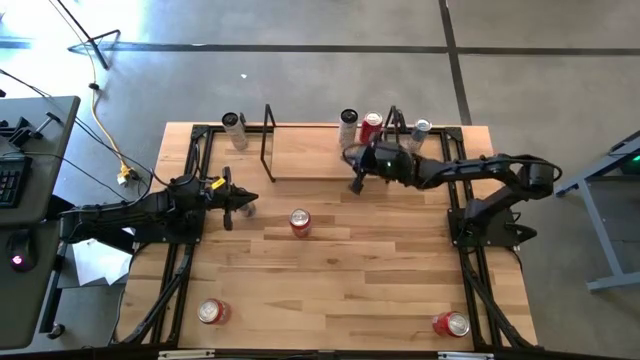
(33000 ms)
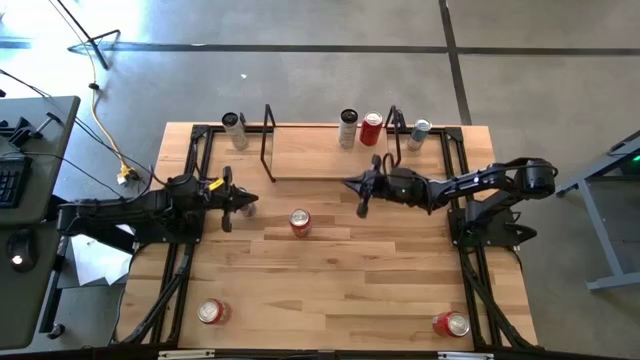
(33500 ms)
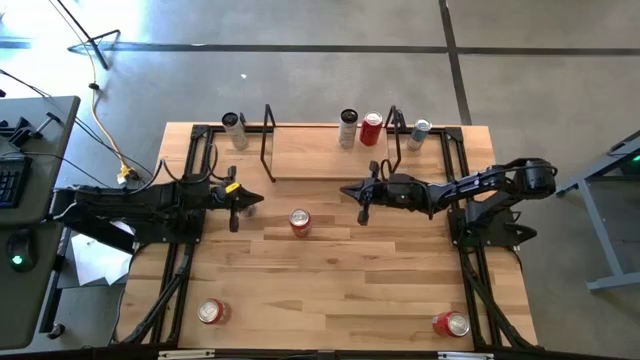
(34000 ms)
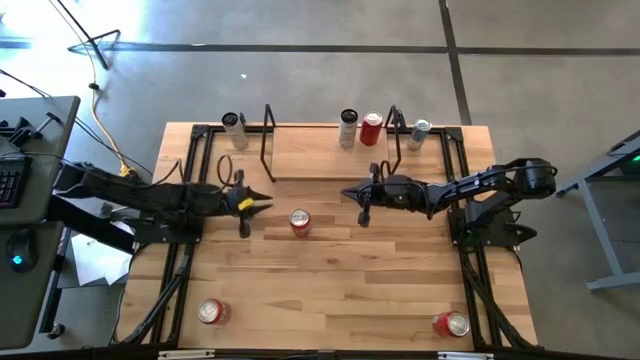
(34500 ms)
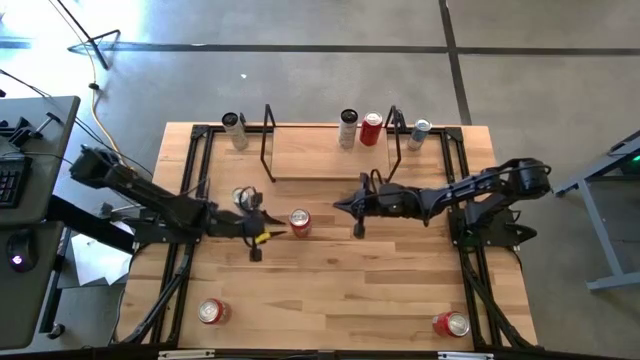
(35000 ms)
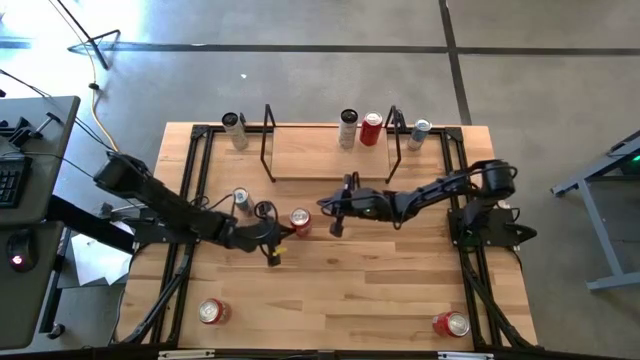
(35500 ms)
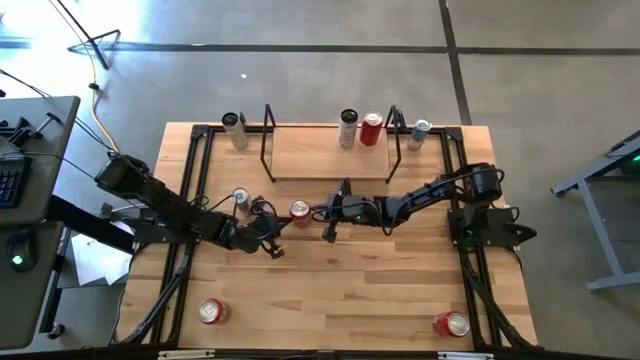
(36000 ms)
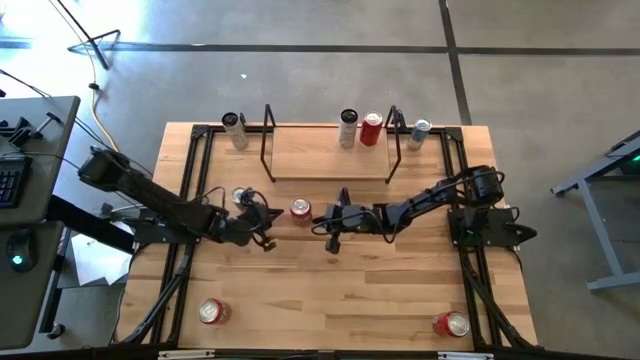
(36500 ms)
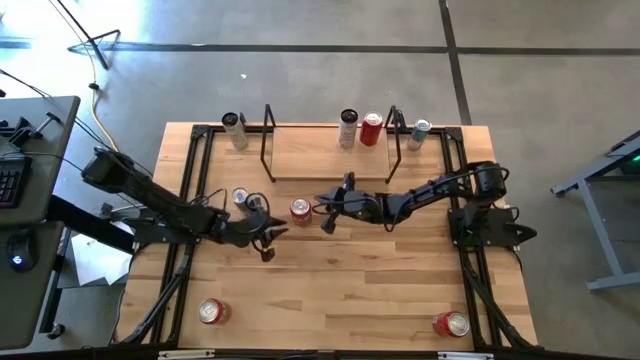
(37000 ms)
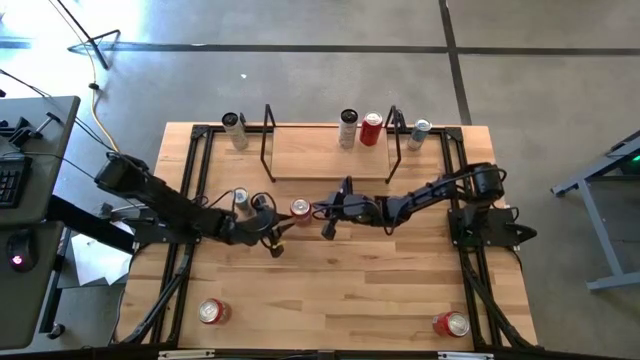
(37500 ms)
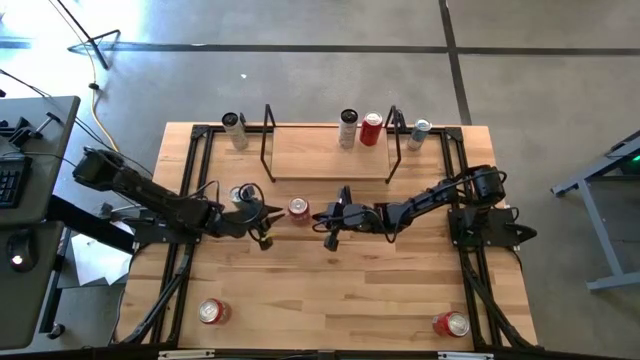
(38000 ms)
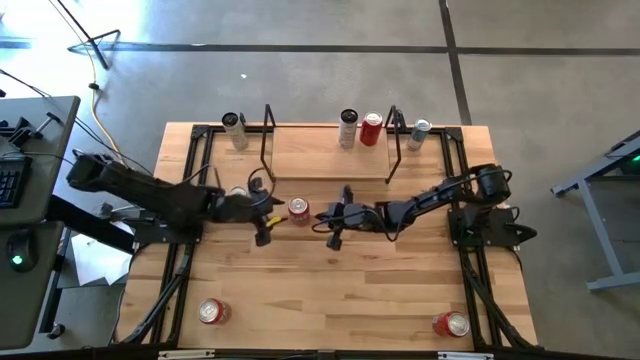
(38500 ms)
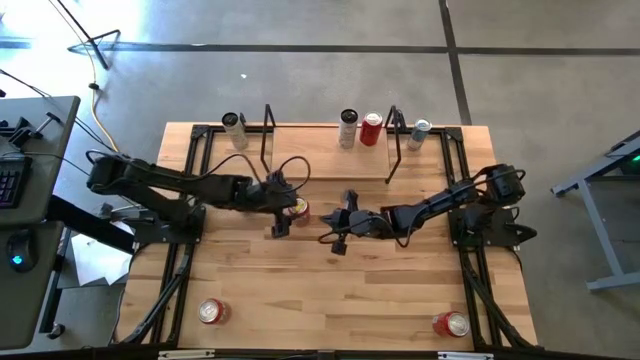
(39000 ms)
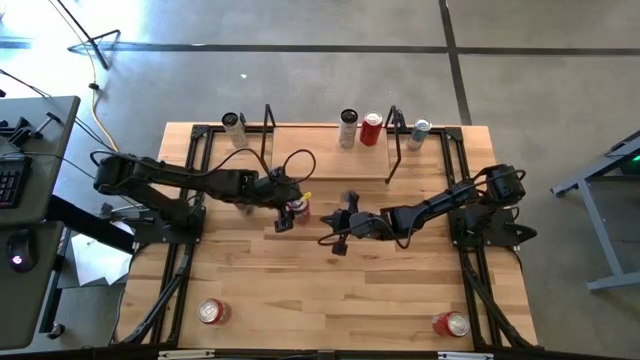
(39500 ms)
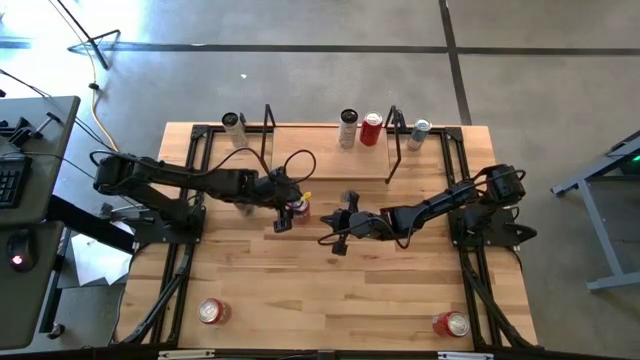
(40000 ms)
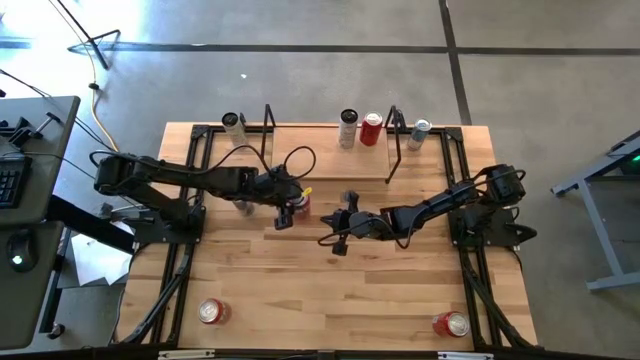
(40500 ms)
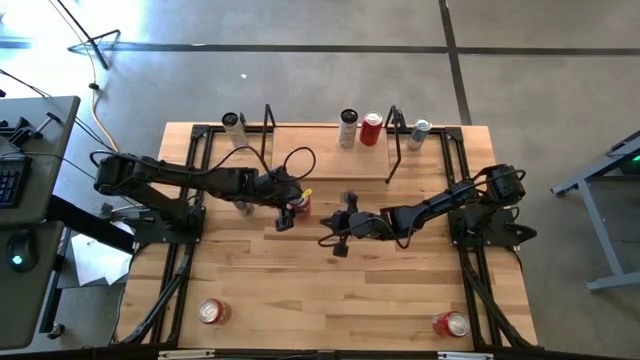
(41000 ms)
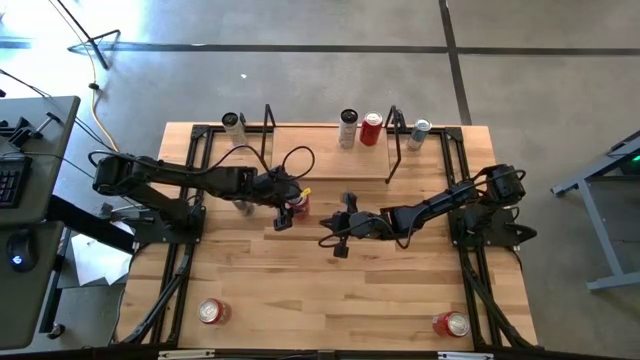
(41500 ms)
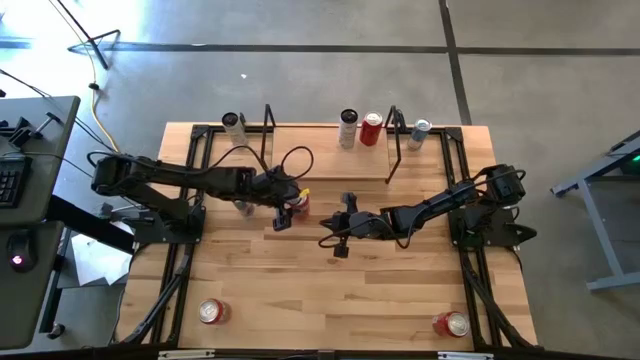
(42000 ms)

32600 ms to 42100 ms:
Task: Place canned beverage on shelf
Put the top red soda can on the shelf

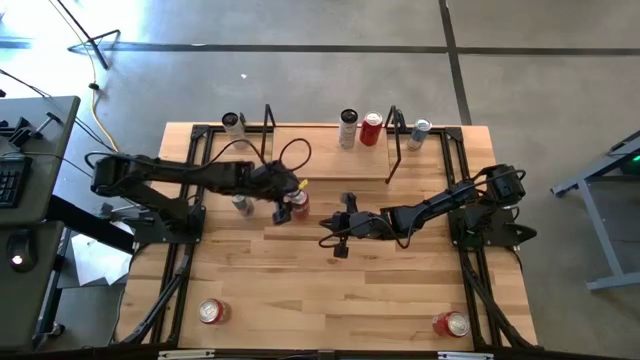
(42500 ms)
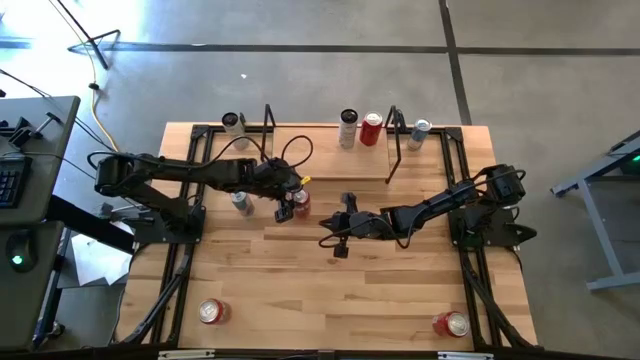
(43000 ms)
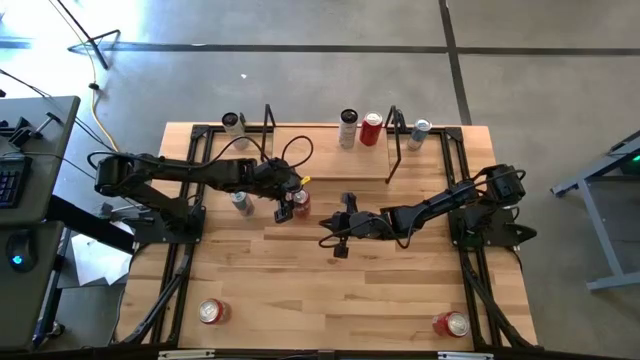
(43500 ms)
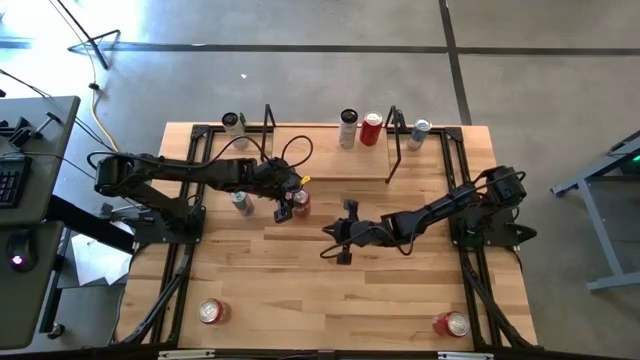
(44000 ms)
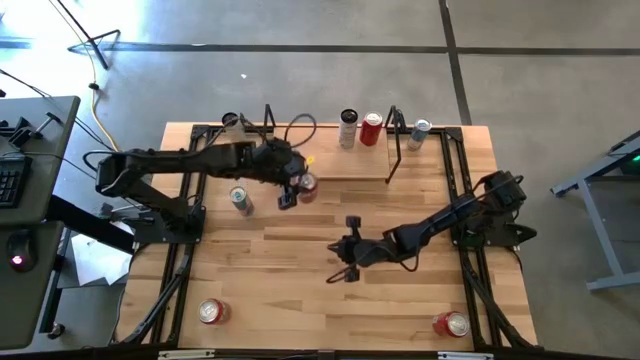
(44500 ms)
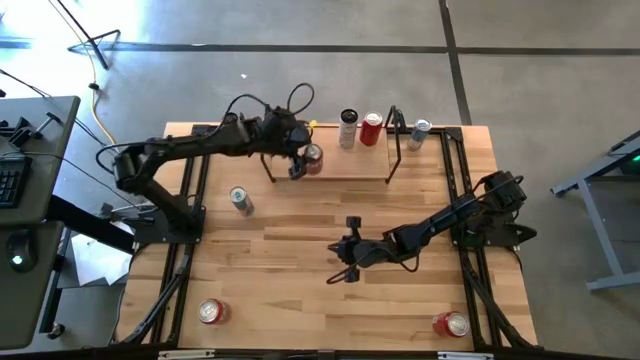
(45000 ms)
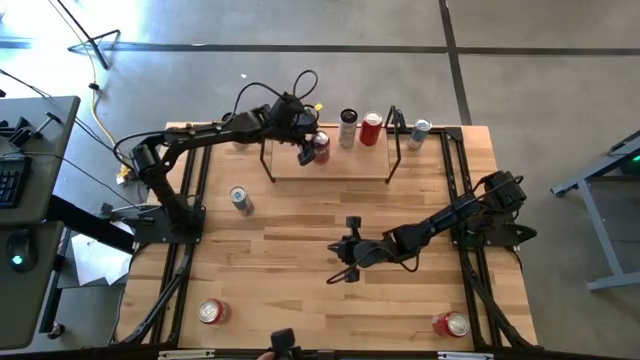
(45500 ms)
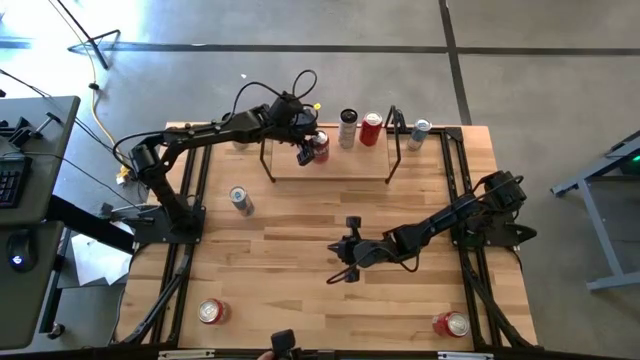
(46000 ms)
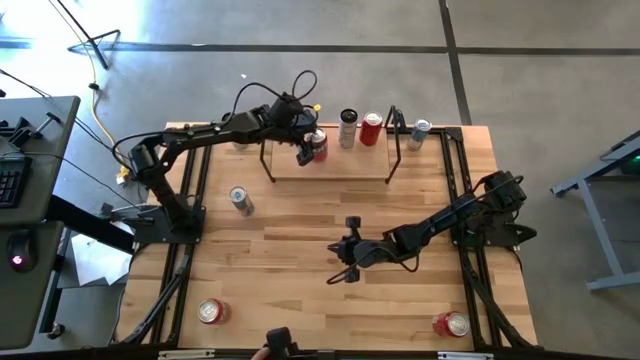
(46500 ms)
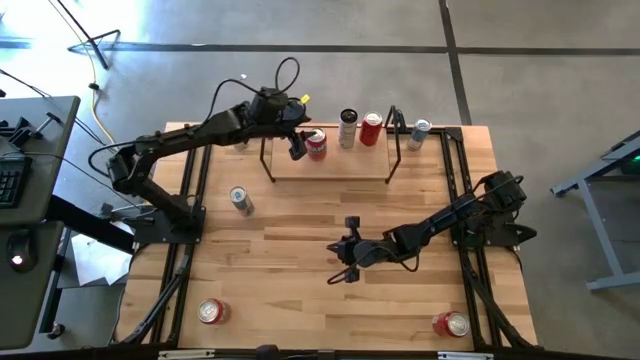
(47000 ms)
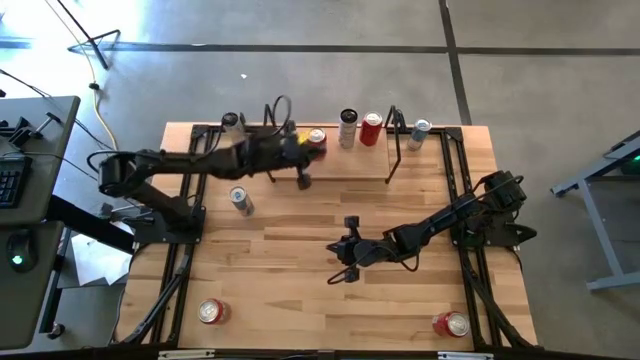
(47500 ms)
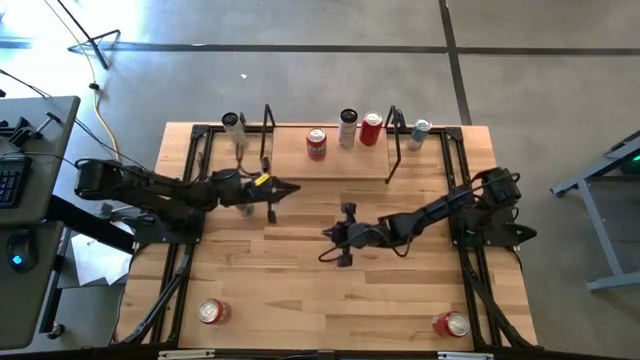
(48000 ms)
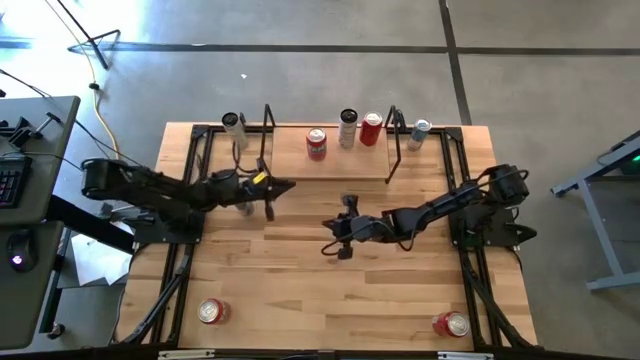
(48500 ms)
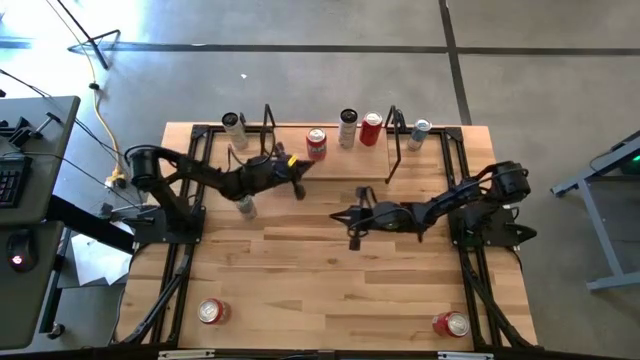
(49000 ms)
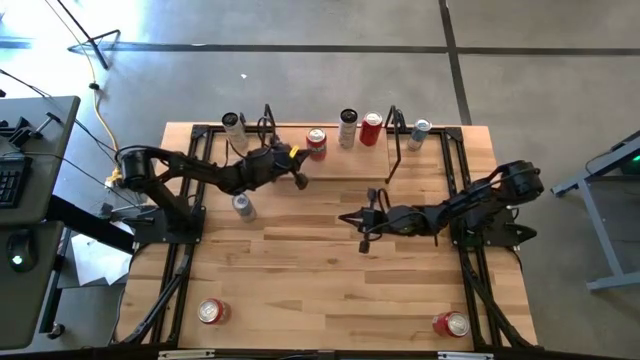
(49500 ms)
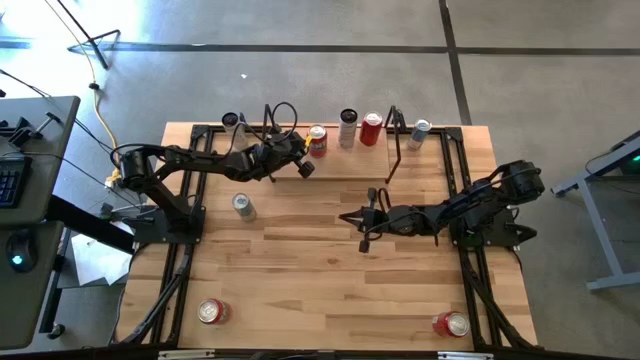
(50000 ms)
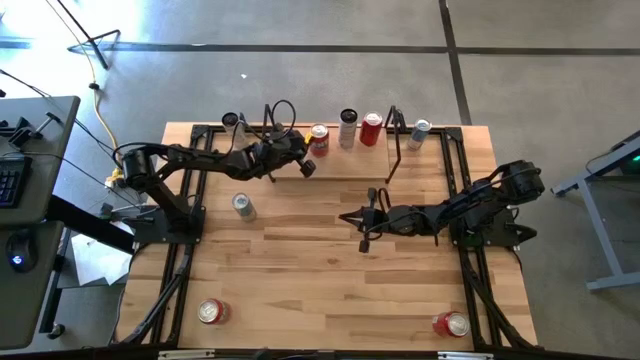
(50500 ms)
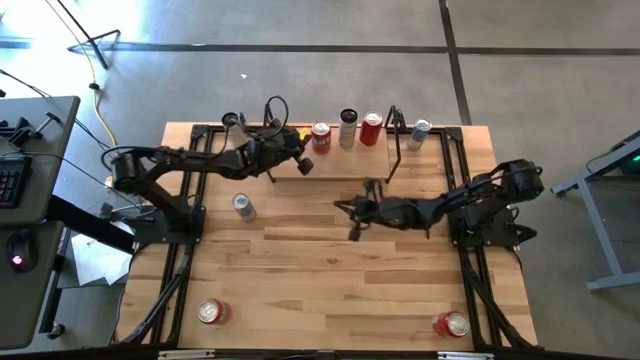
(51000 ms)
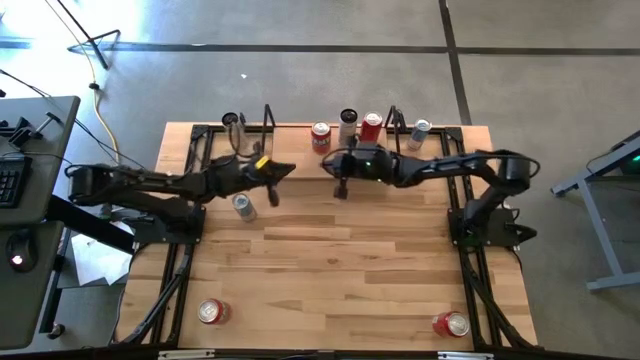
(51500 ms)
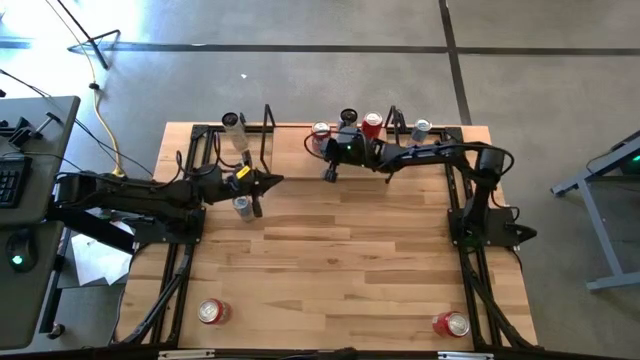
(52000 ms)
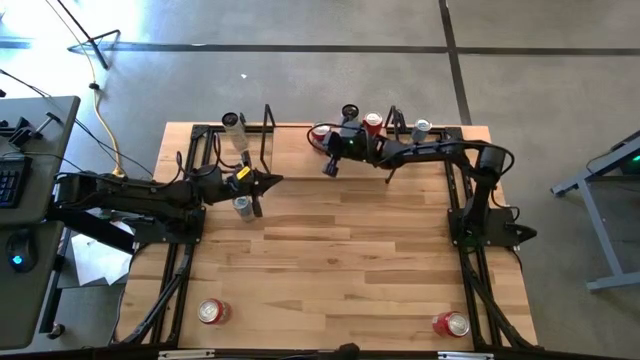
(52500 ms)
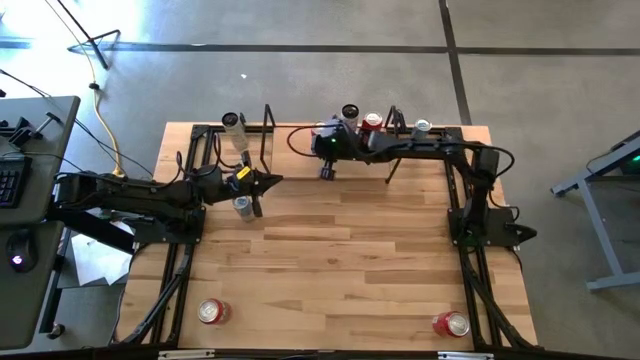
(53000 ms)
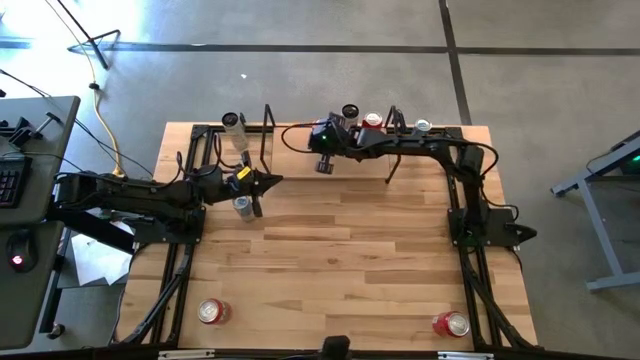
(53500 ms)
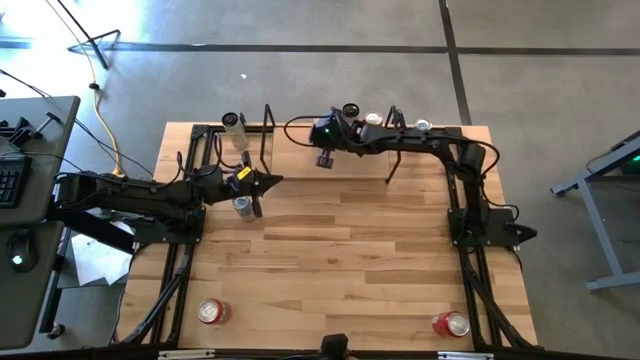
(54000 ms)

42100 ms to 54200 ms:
Put the top red soda can on the shelf

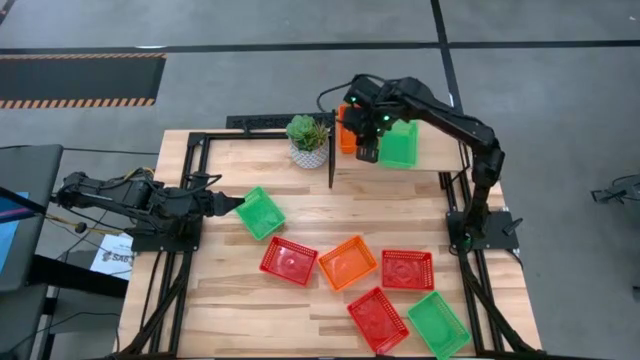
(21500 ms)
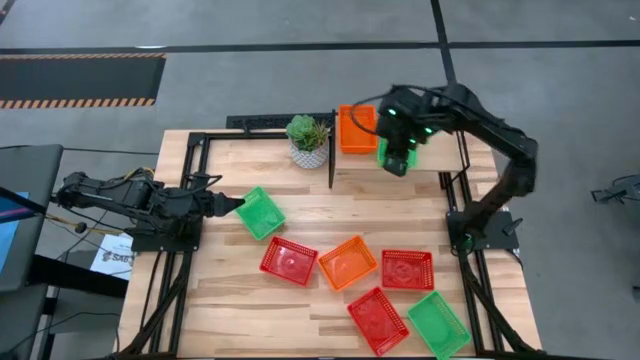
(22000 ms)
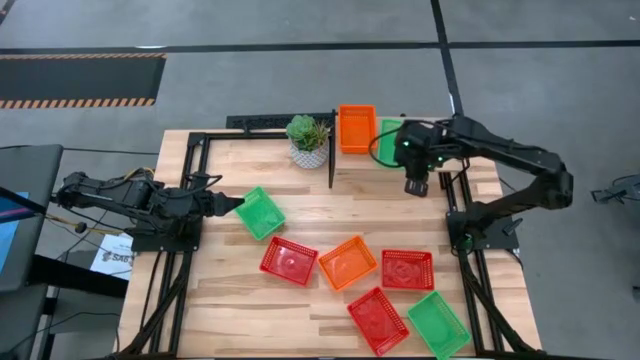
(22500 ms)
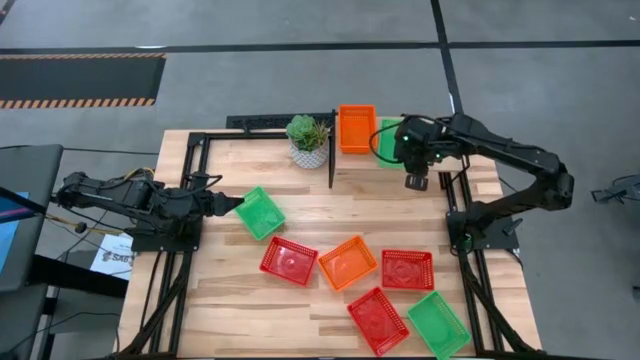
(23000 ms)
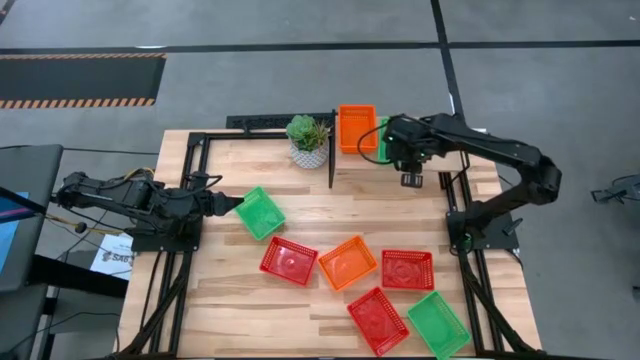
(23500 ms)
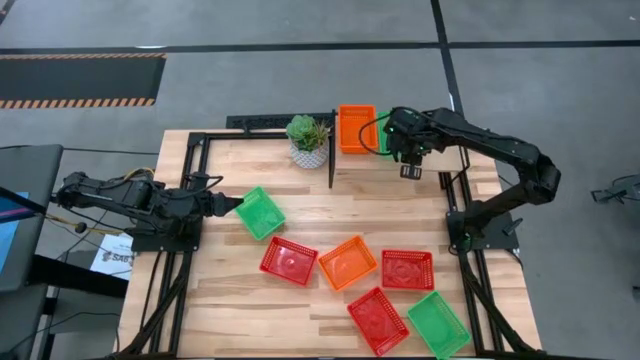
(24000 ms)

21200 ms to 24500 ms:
Task: Stack baskets on shelf by color
Adjust the green bin on the shelf
